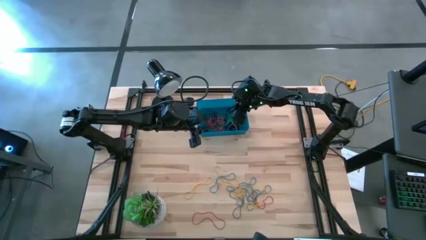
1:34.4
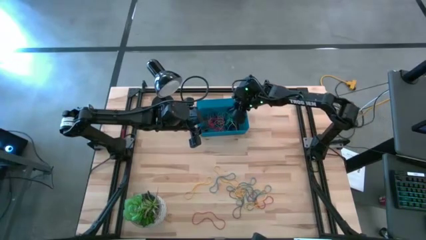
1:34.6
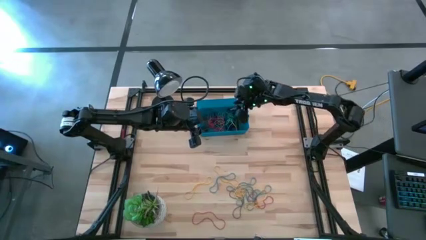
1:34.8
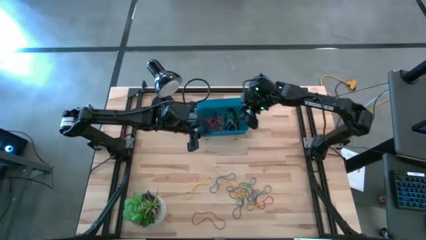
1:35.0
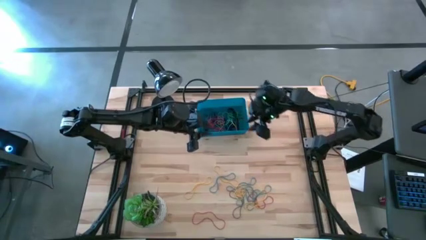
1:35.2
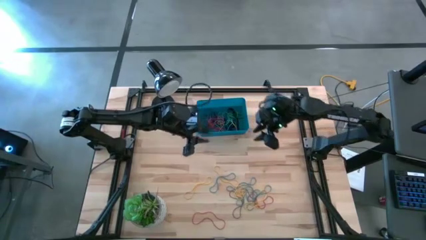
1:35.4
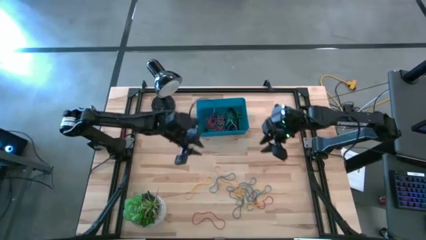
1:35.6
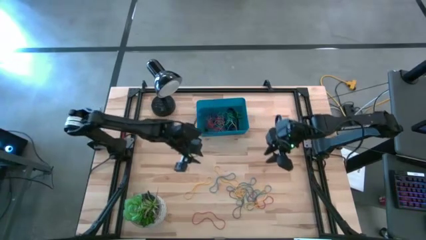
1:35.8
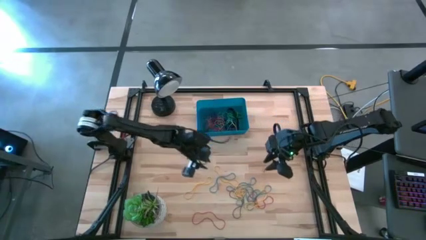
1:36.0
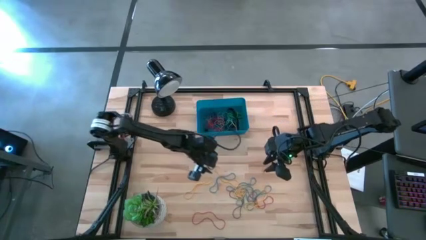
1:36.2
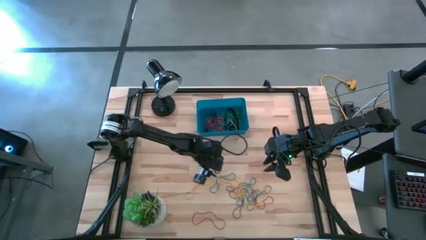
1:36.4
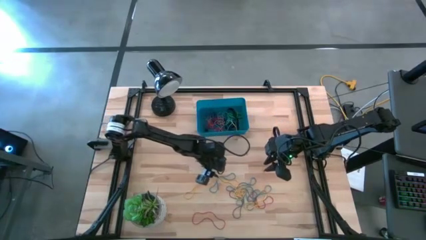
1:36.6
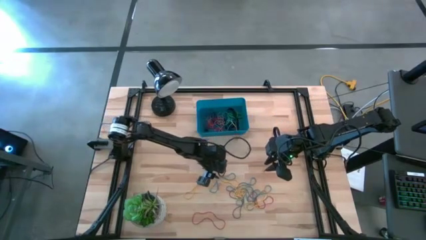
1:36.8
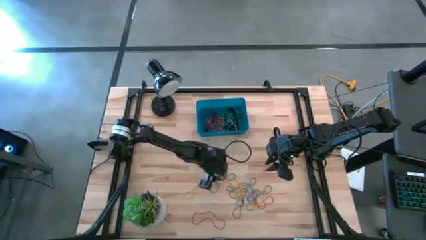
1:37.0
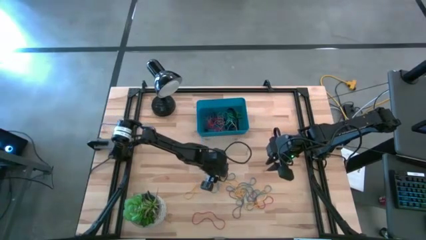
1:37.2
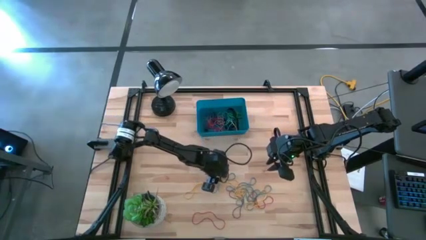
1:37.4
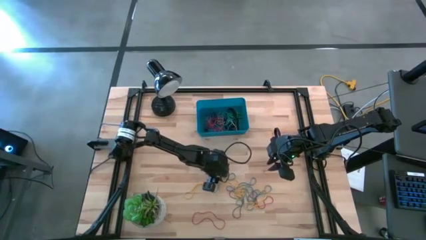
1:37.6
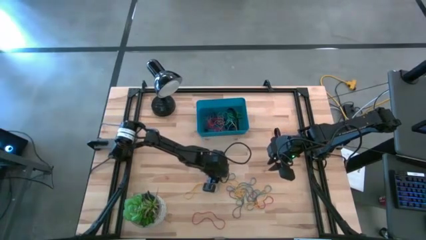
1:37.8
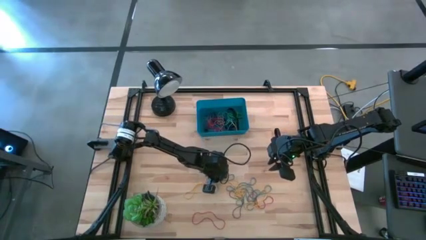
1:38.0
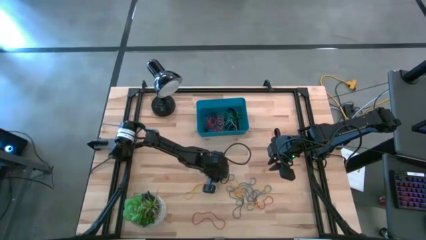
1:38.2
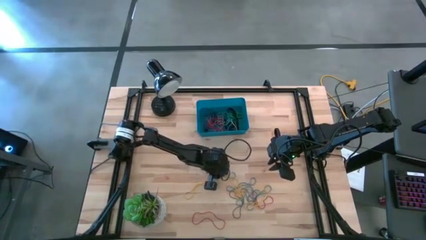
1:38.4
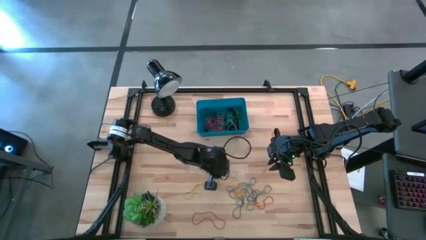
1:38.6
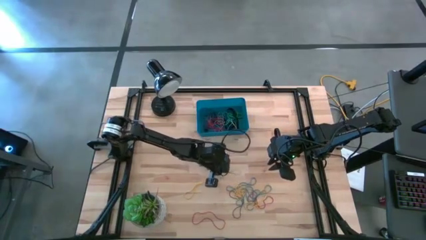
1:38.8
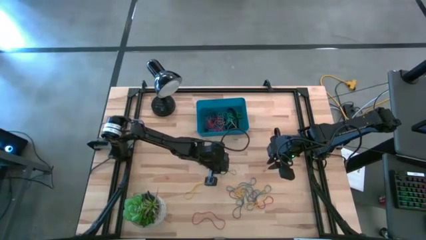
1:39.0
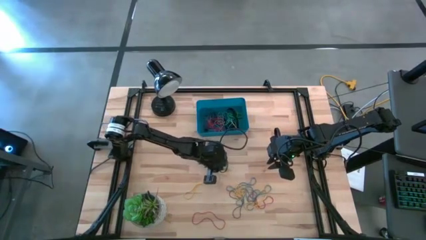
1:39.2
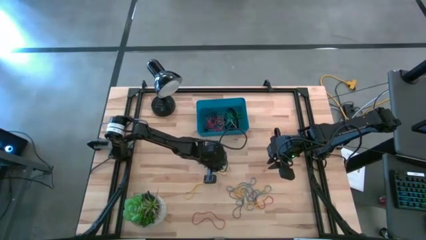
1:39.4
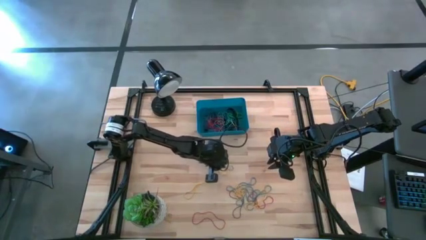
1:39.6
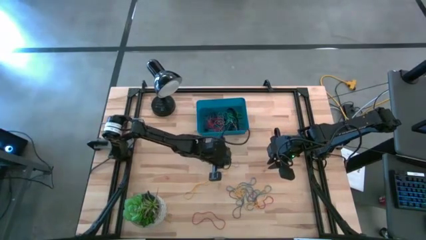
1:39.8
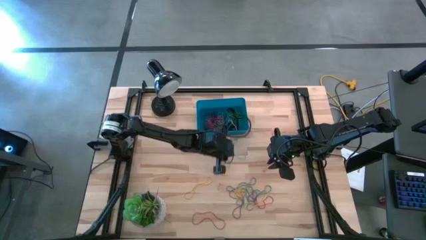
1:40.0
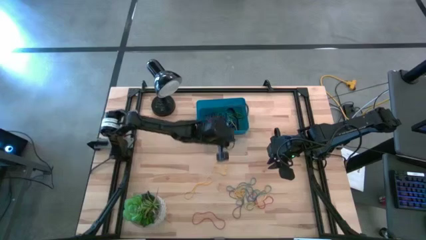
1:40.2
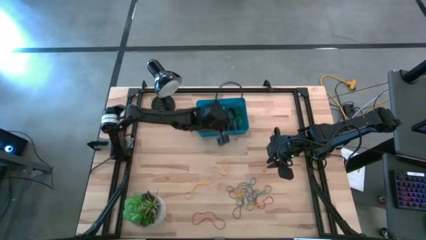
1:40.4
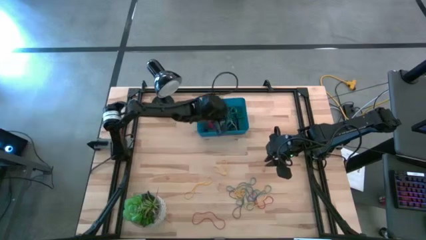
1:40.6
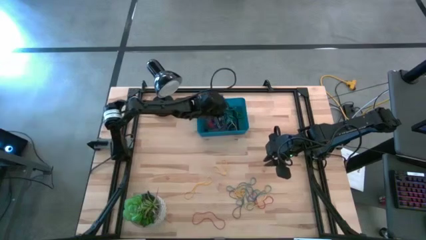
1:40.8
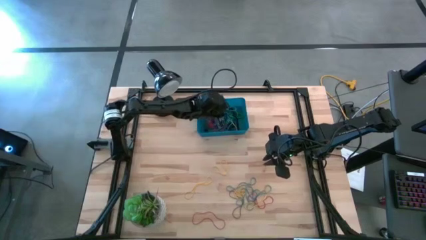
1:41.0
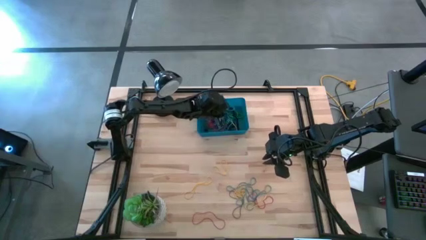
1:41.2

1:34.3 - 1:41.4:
Task: Pick and place rubber bands into bin
Put the blue rubber band into the blue bin

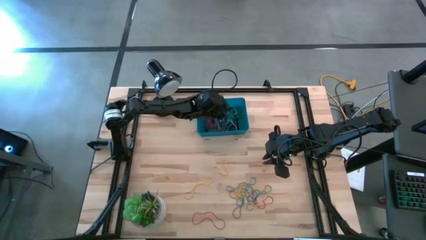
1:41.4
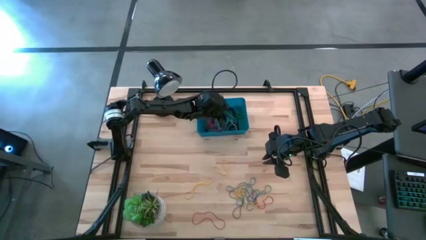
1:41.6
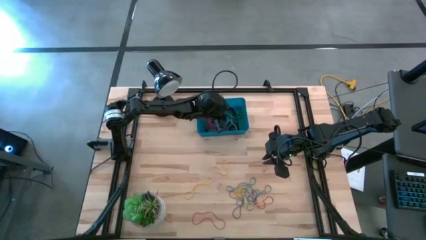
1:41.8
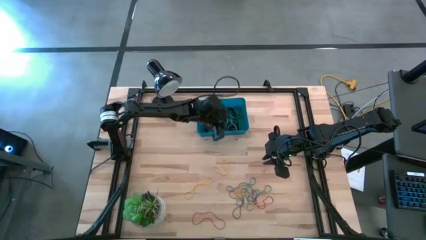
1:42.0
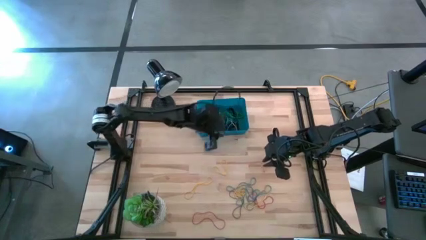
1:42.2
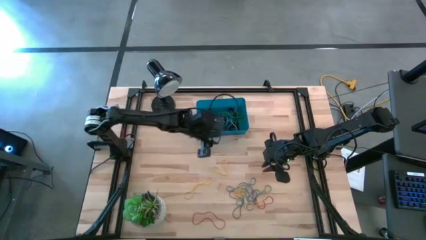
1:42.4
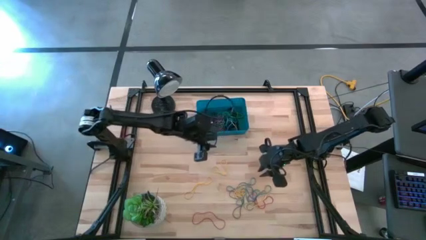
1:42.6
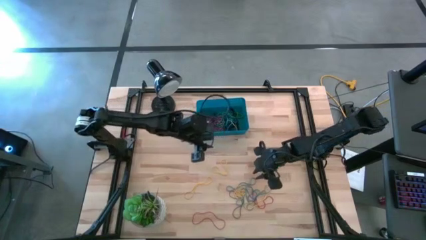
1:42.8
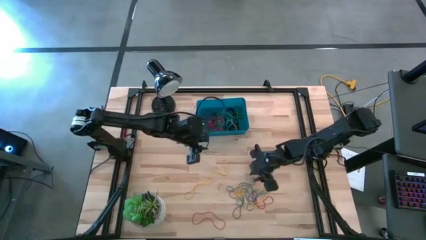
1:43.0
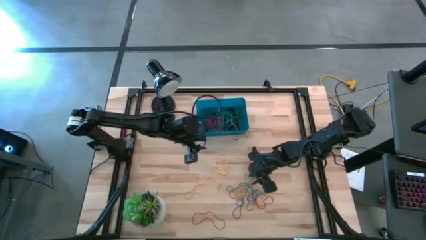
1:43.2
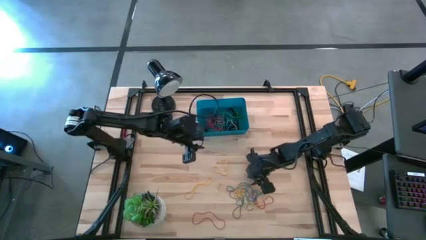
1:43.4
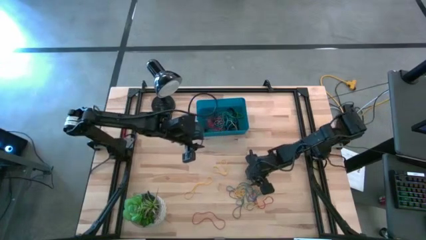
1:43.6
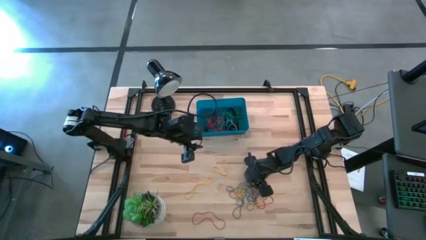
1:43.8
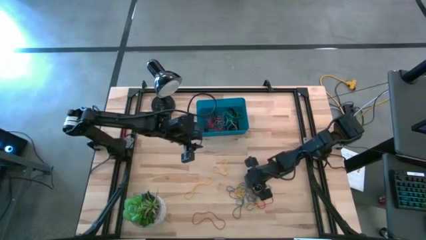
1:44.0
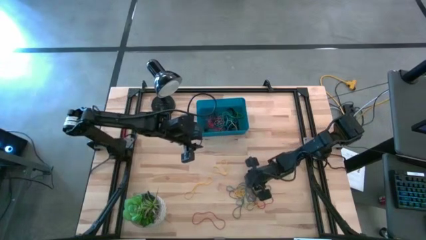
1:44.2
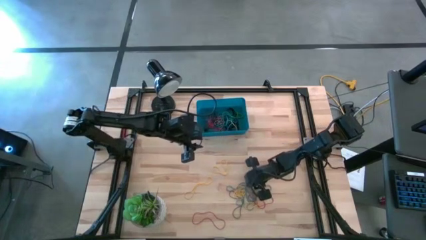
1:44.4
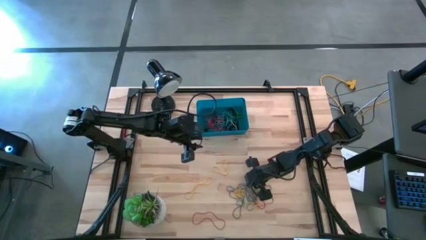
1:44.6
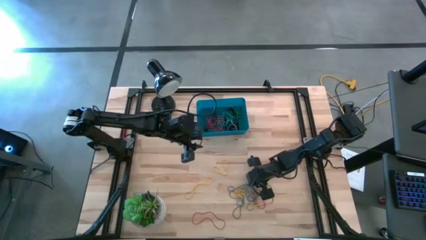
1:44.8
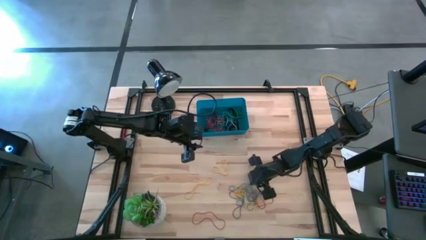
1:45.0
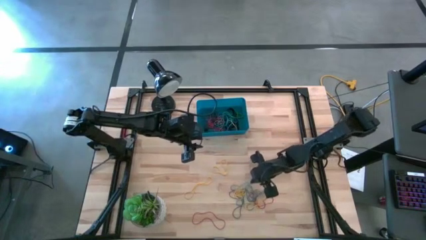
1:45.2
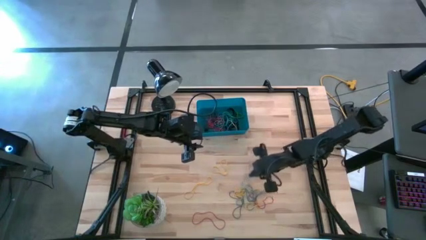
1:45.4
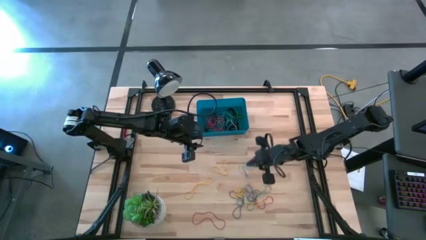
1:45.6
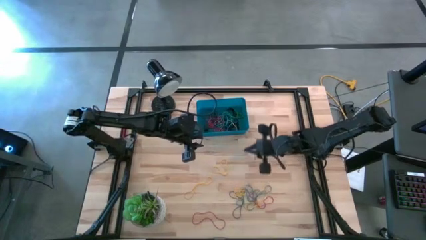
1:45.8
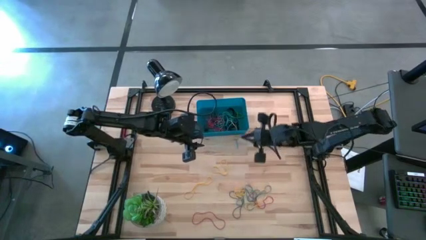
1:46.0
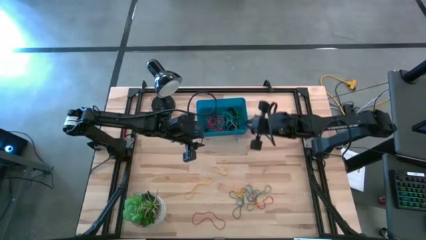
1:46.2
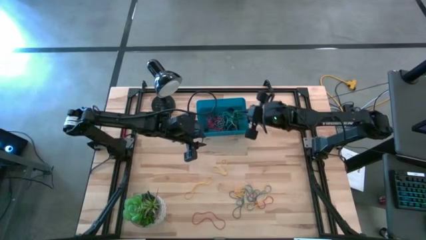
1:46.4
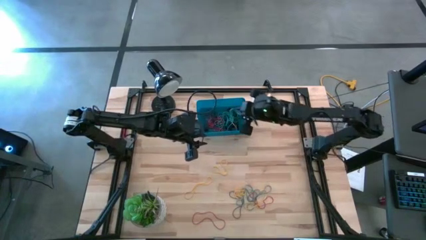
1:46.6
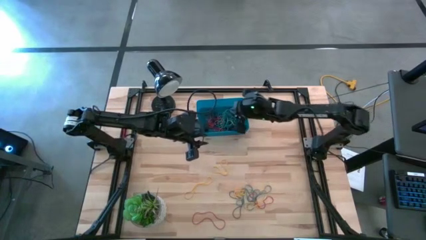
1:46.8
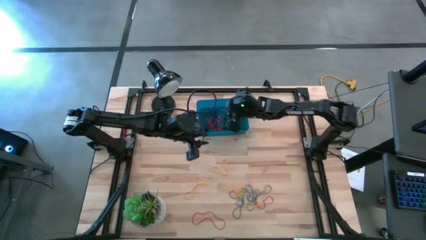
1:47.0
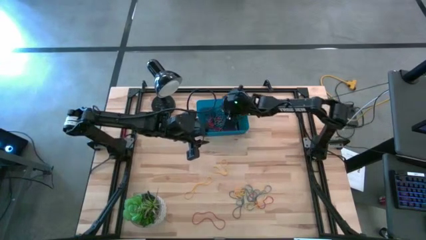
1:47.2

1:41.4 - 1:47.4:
Put the blue rubber band into the blue bin

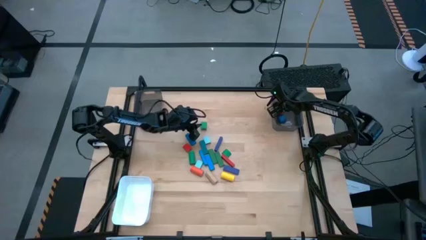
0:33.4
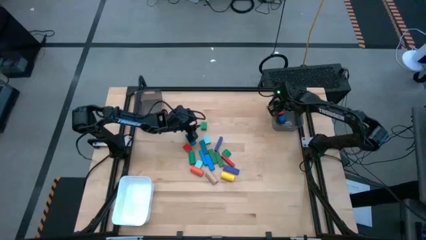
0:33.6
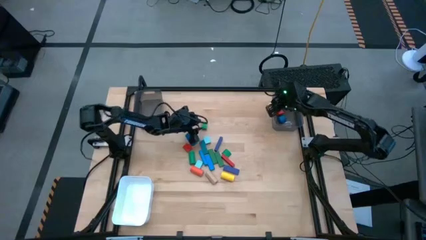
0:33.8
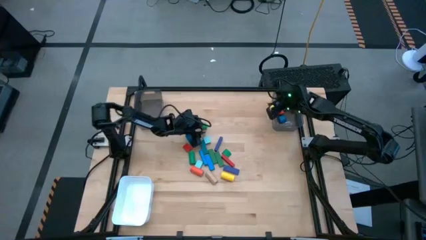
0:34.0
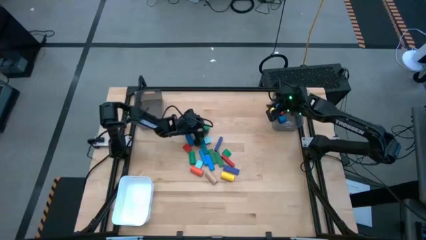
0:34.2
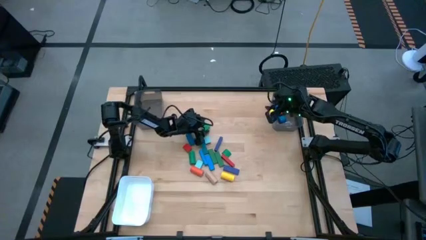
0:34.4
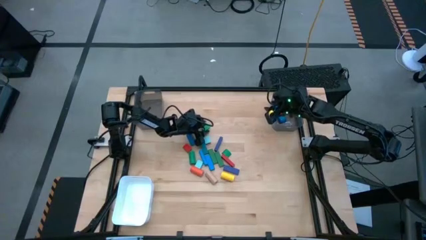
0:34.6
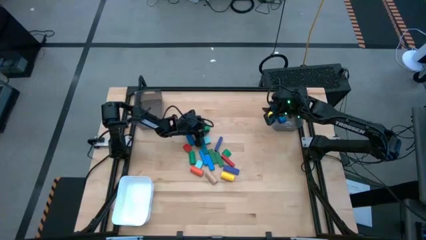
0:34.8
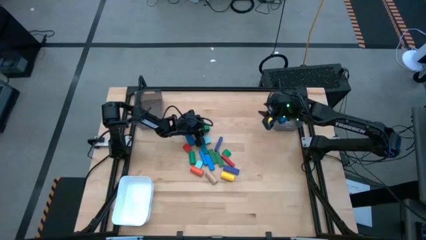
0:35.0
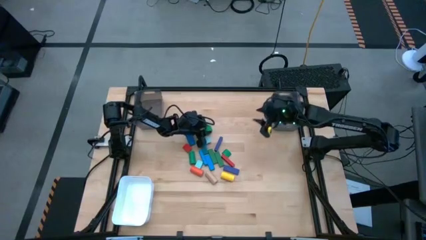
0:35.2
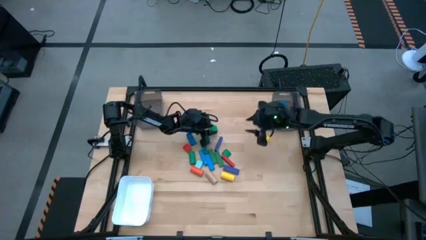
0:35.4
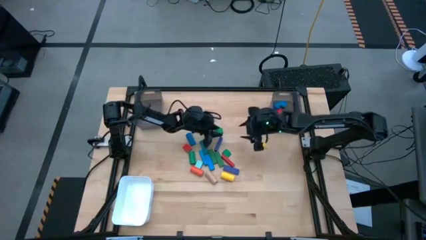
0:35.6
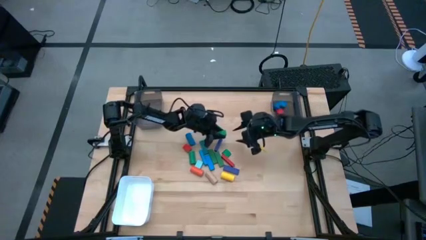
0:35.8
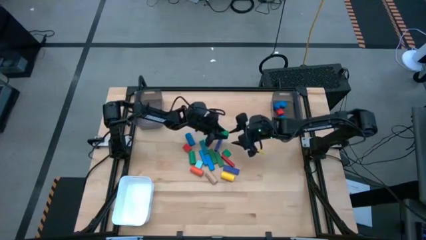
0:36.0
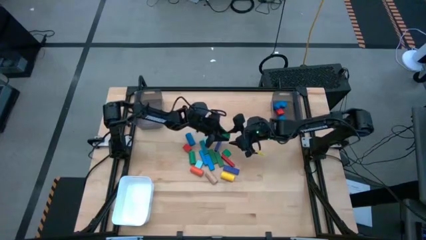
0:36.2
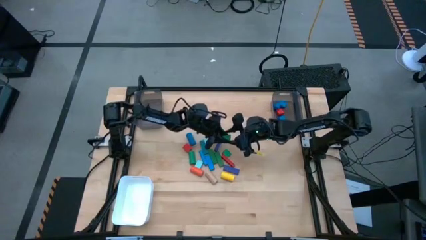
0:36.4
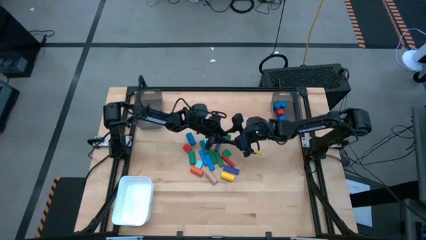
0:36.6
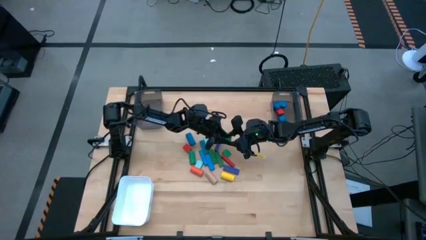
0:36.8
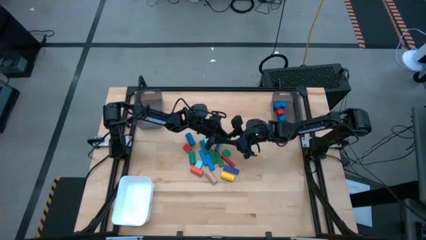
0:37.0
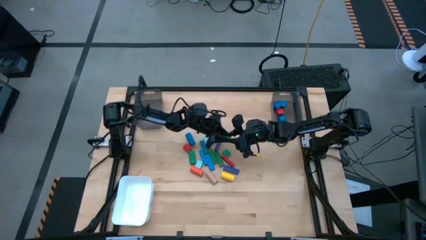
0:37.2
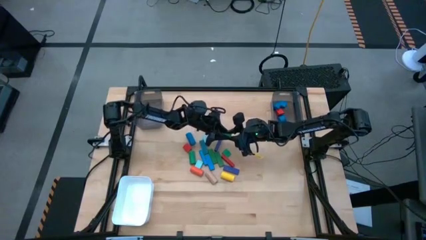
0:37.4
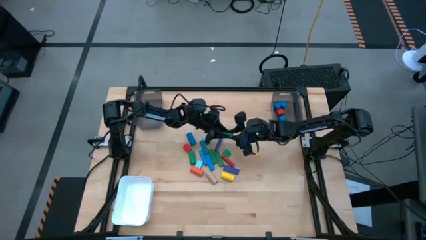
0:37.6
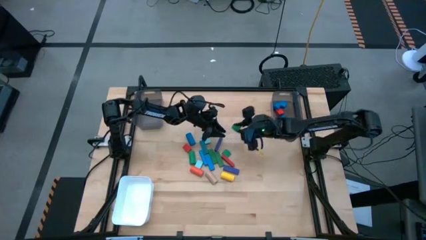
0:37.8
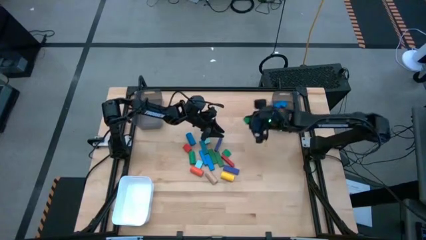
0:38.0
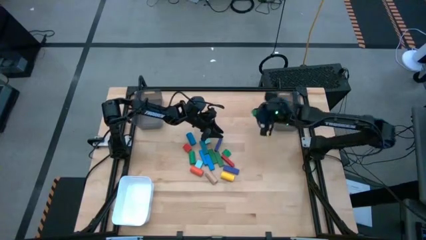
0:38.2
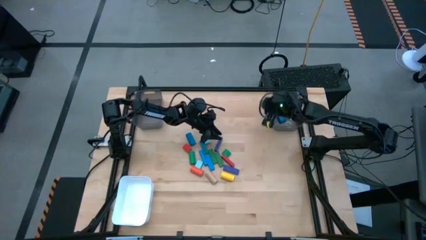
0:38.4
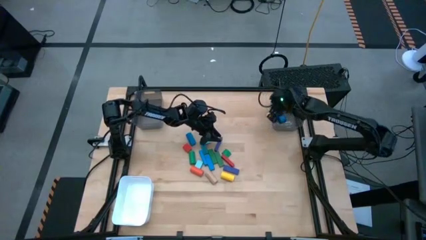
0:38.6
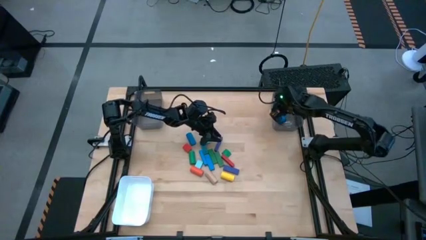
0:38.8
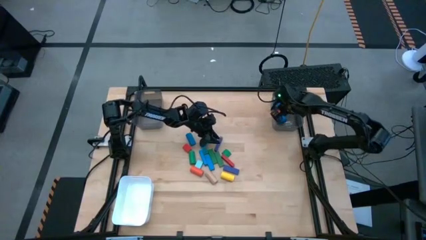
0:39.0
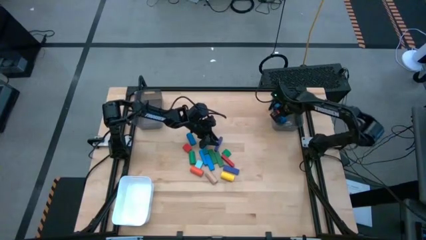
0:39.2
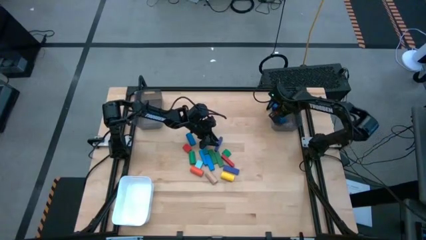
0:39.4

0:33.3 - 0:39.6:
Task: Sort blocks by size
Put the green half circle block into the right black bin
